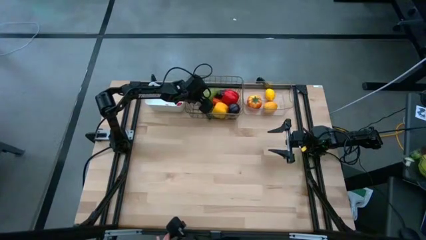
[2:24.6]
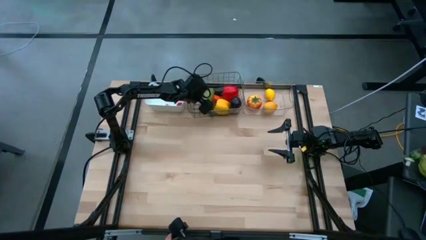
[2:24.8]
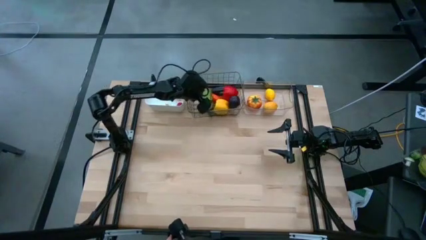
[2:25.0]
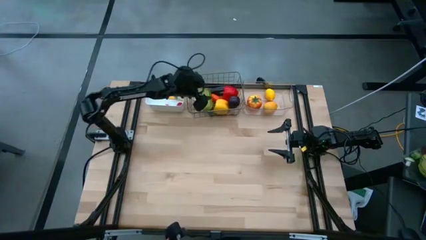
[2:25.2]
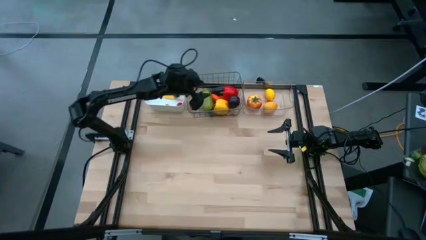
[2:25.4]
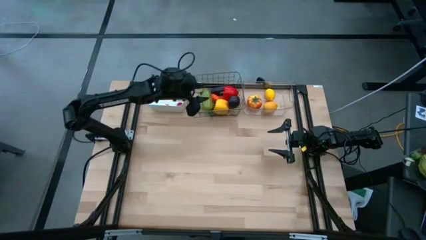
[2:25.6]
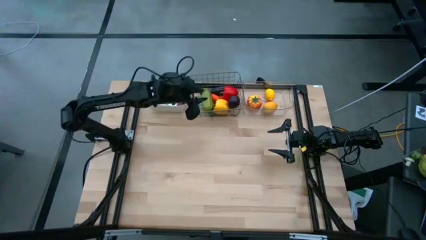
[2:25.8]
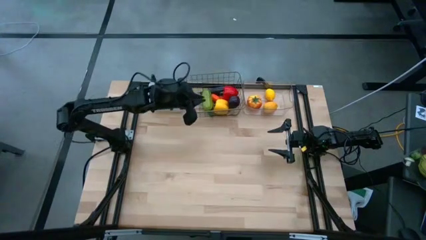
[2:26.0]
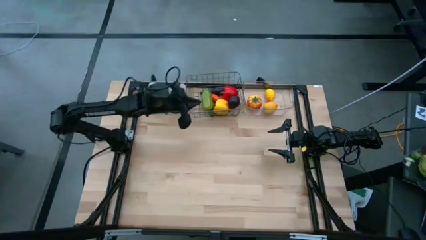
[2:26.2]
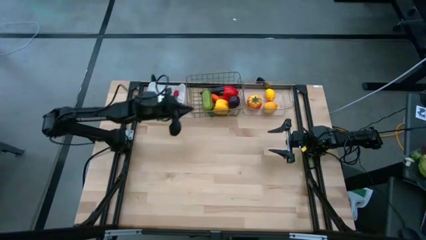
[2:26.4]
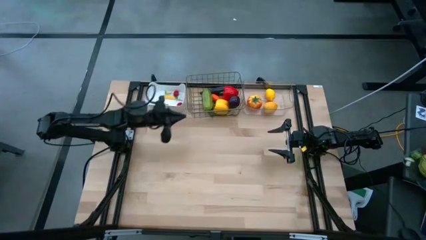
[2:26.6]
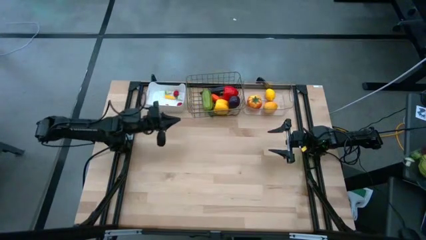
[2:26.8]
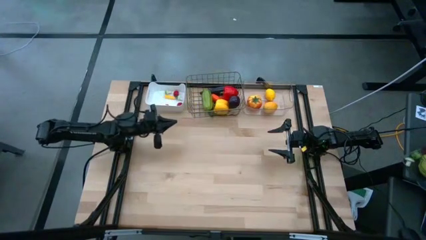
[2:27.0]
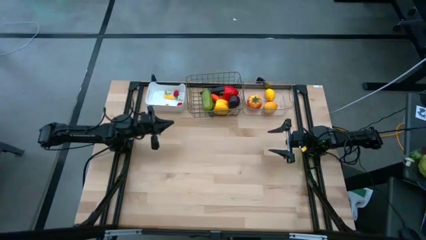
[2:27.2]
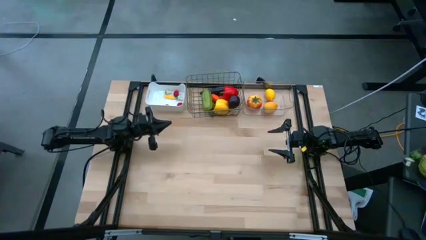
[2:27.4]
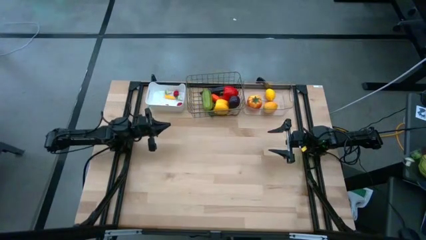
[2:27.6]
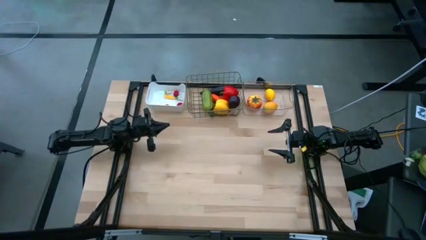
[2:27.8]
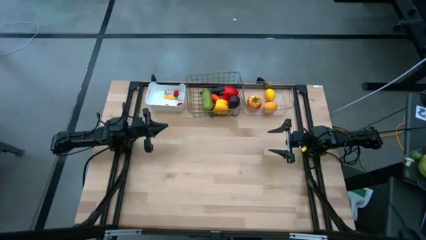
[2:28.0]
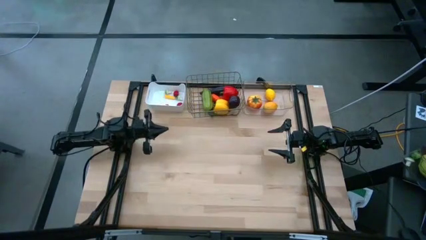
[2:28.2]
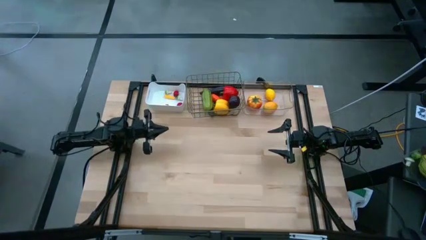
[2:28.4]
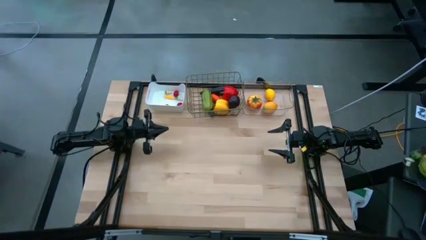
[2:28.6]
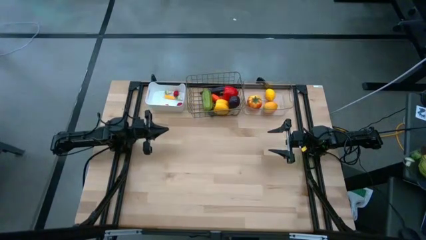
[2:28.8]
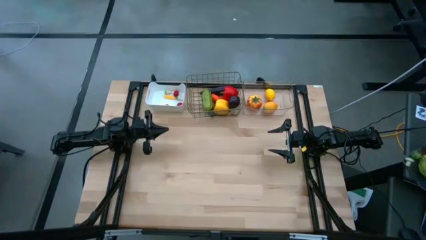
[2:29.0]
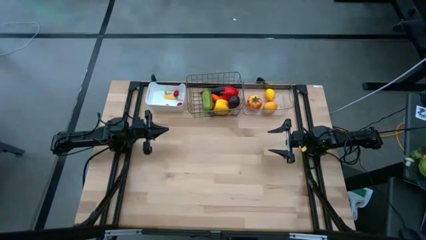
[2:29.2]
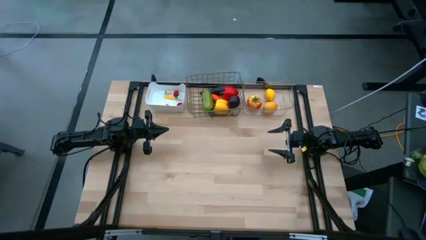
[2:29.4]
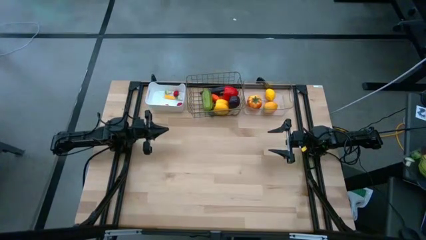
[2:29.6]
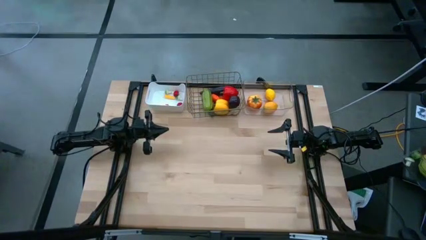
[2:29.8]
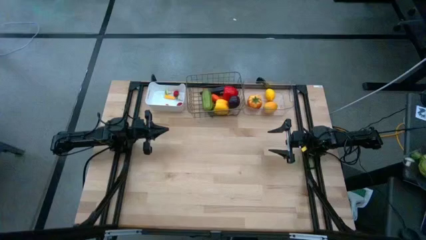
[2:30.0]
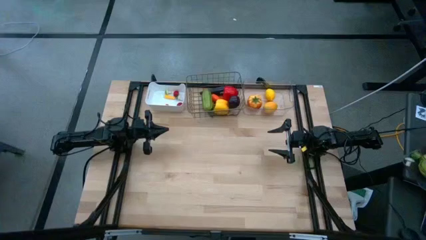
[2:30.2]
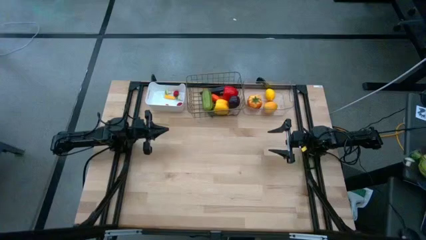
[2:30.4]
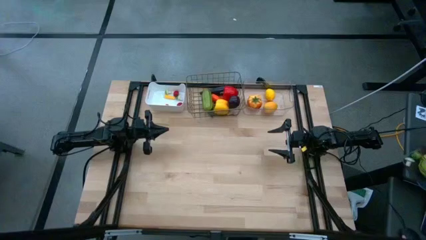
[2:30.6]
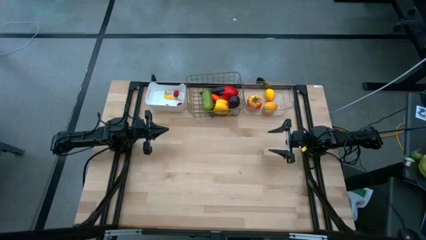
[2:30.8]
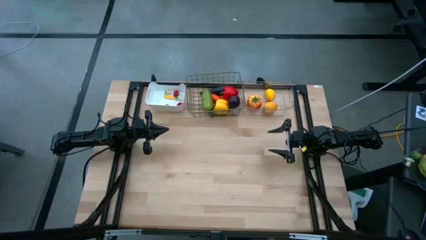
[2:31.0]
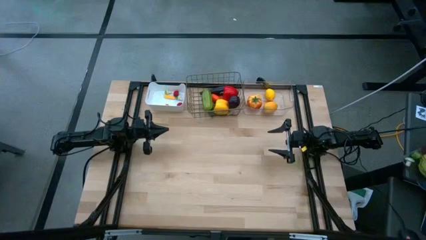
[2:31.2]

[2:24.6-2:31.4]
Task: Sort produce into baskets
Return to Home Position

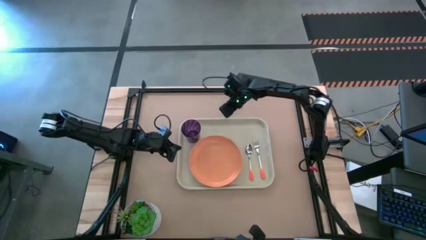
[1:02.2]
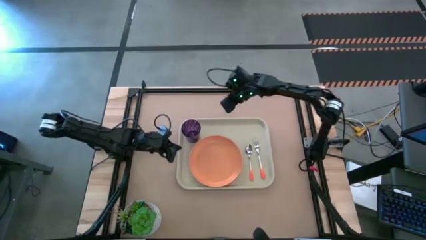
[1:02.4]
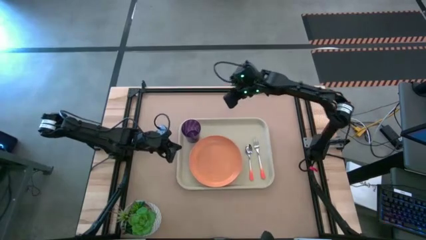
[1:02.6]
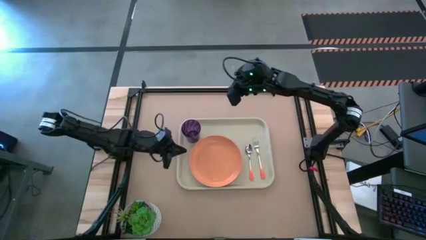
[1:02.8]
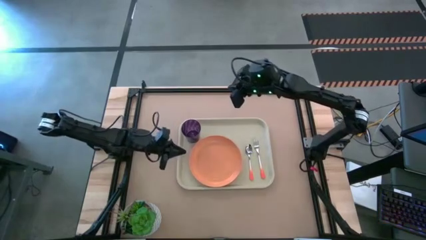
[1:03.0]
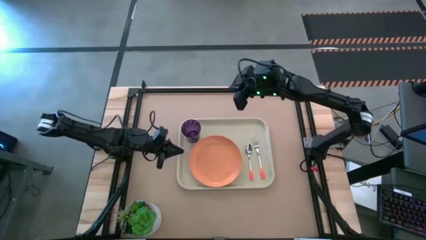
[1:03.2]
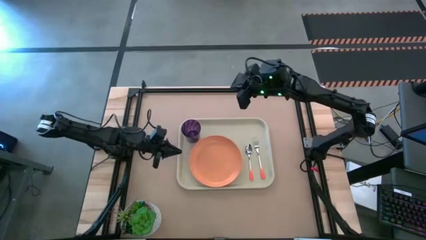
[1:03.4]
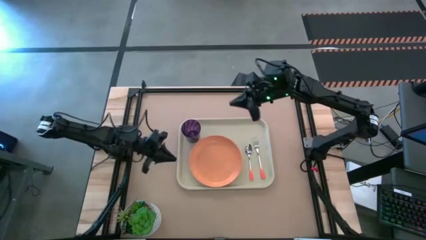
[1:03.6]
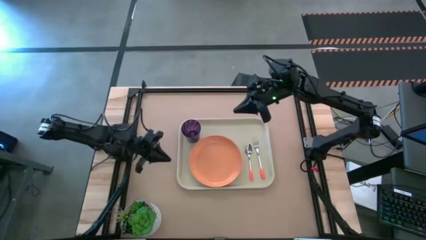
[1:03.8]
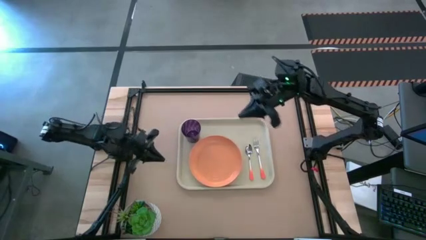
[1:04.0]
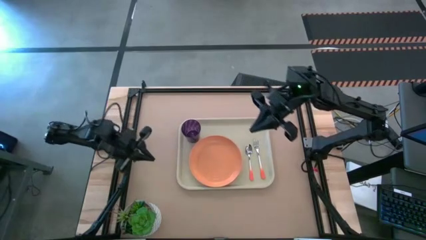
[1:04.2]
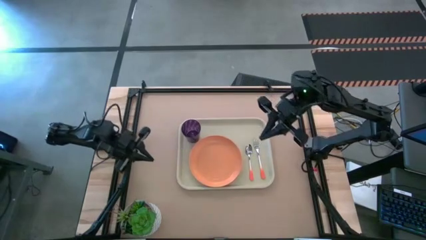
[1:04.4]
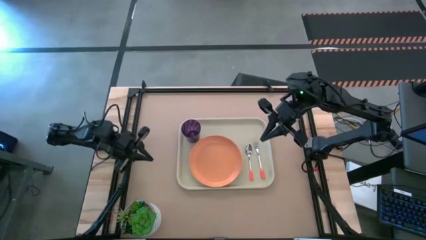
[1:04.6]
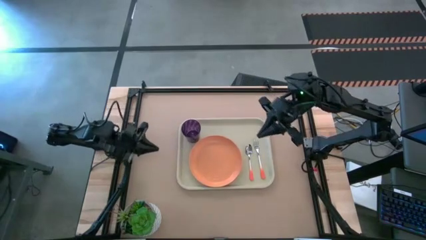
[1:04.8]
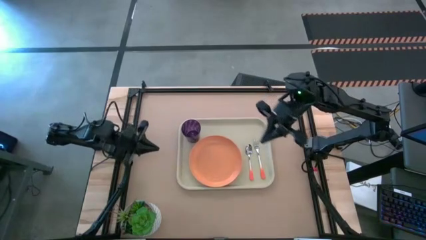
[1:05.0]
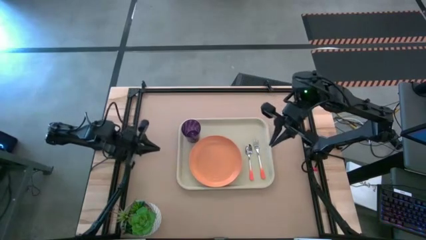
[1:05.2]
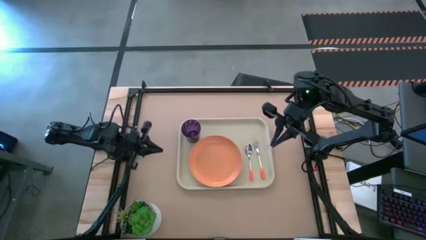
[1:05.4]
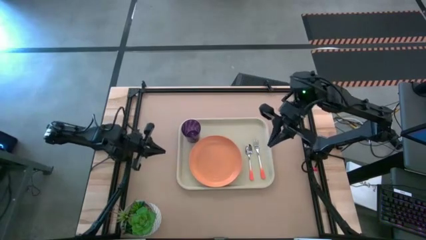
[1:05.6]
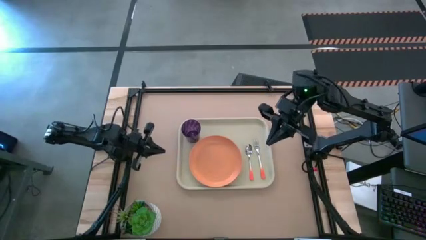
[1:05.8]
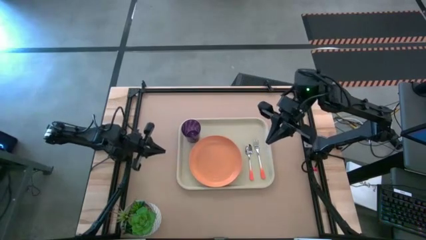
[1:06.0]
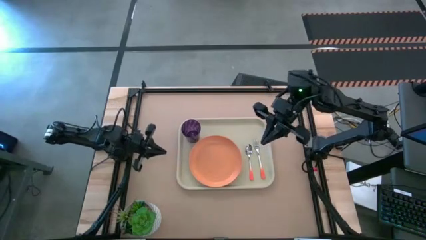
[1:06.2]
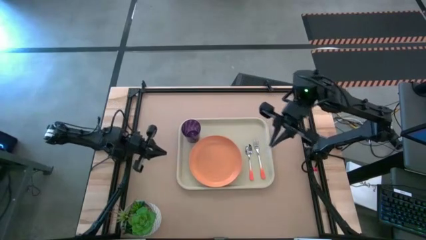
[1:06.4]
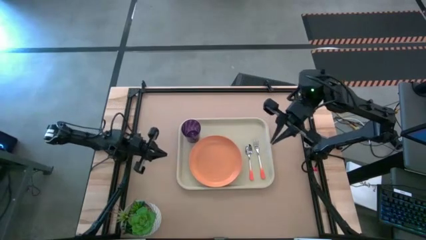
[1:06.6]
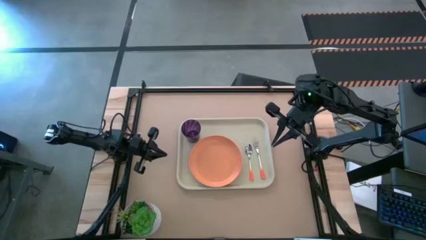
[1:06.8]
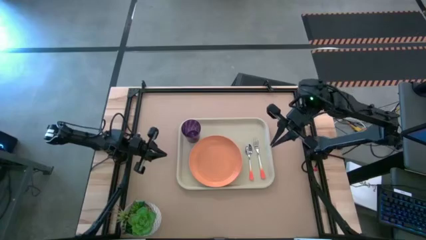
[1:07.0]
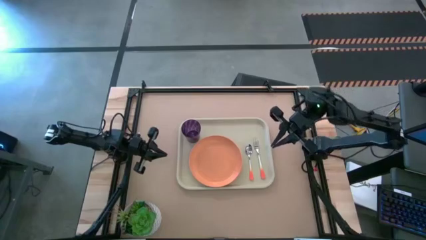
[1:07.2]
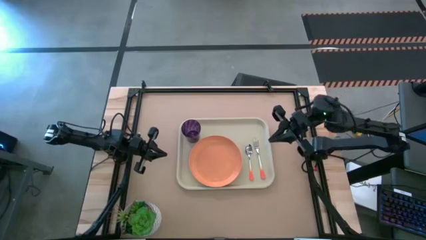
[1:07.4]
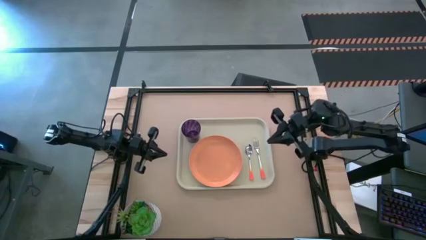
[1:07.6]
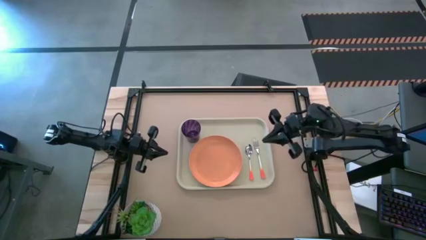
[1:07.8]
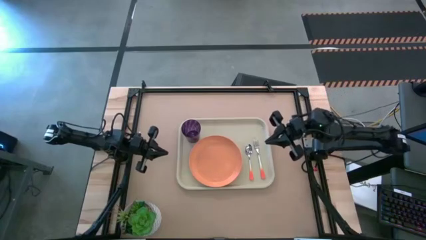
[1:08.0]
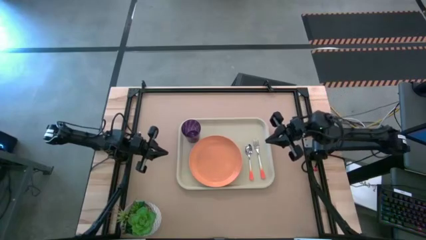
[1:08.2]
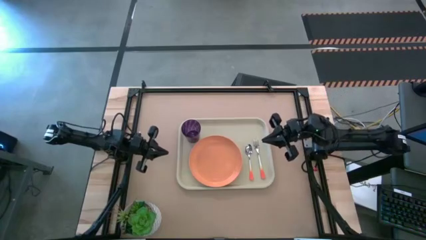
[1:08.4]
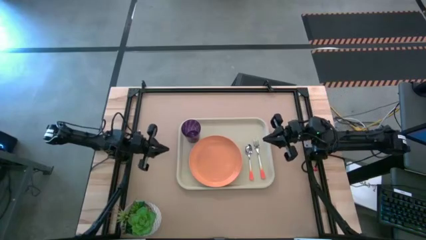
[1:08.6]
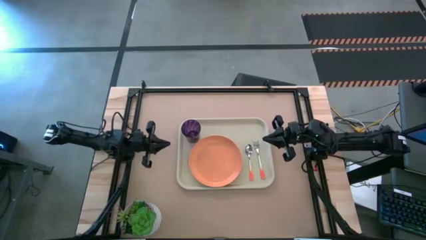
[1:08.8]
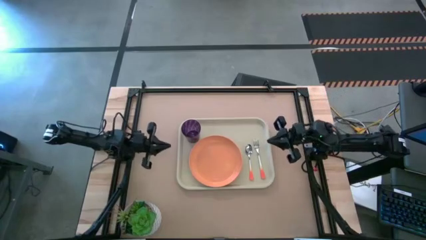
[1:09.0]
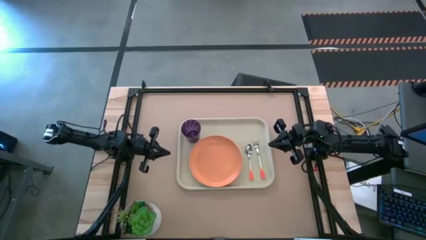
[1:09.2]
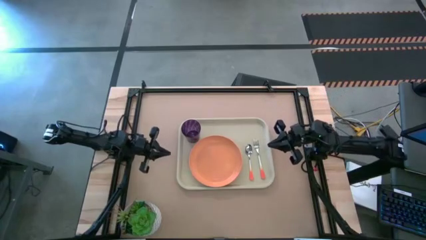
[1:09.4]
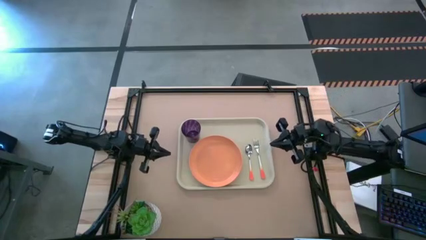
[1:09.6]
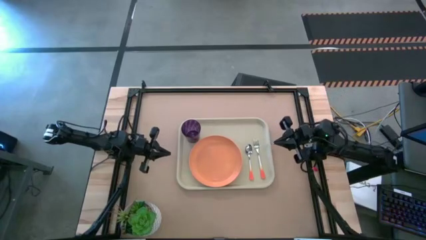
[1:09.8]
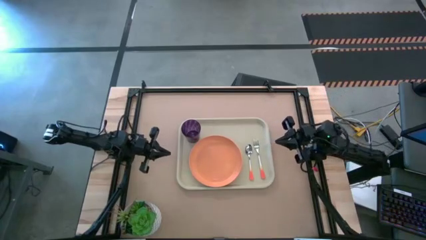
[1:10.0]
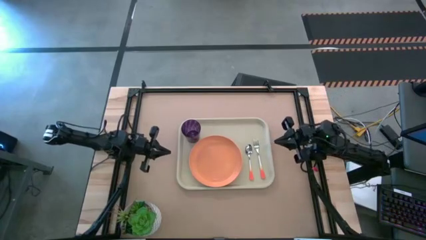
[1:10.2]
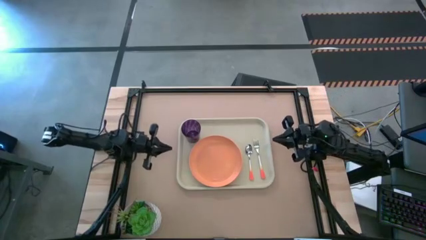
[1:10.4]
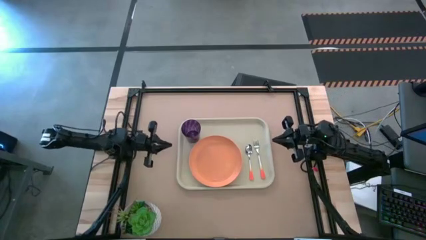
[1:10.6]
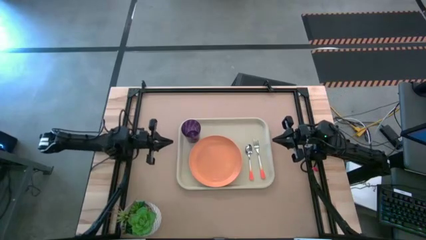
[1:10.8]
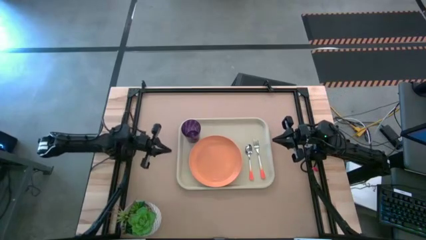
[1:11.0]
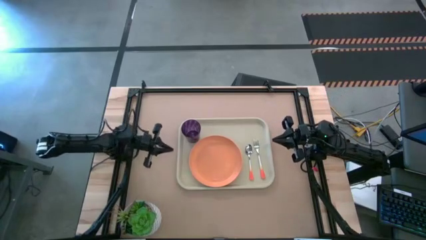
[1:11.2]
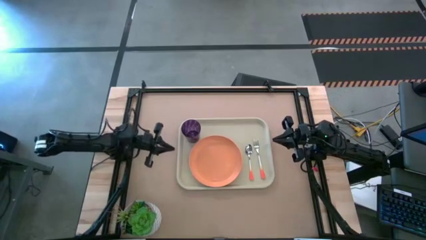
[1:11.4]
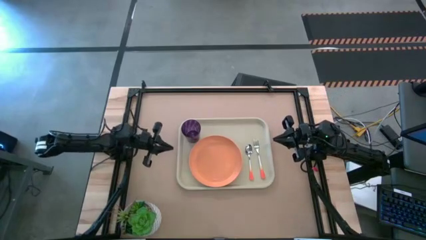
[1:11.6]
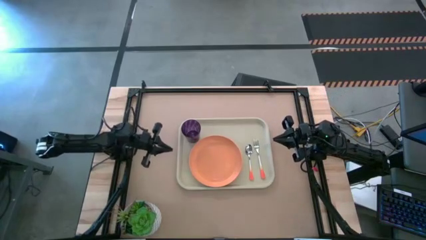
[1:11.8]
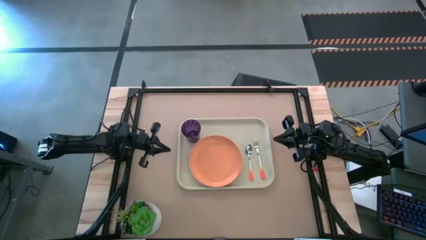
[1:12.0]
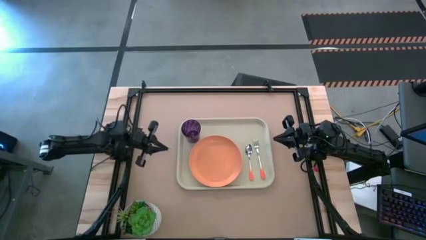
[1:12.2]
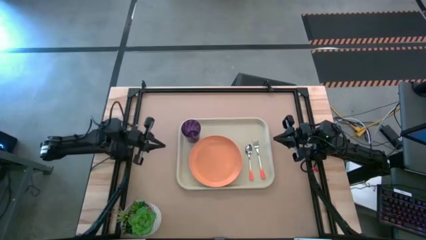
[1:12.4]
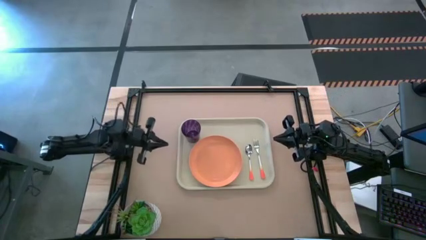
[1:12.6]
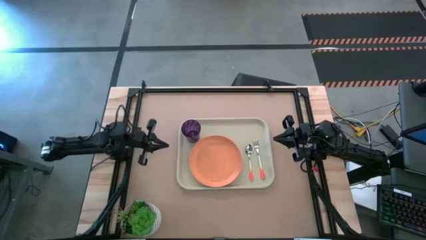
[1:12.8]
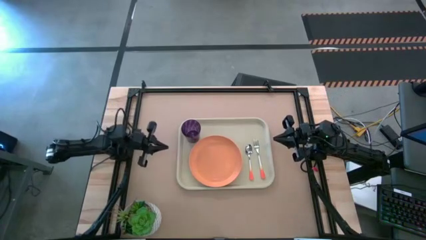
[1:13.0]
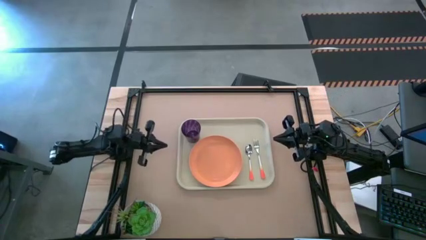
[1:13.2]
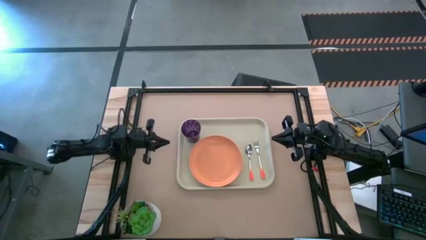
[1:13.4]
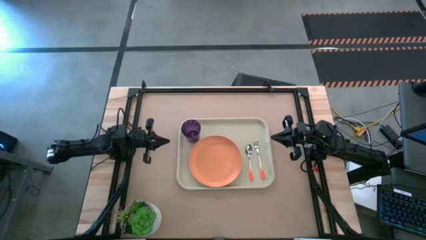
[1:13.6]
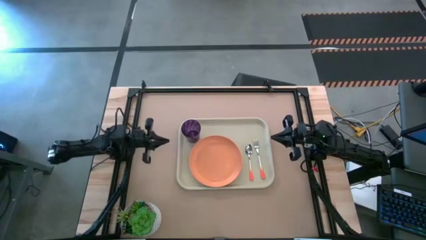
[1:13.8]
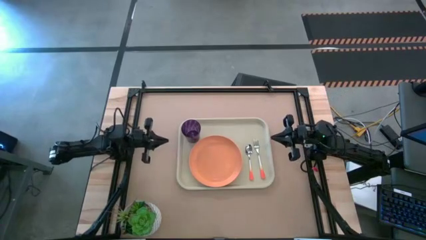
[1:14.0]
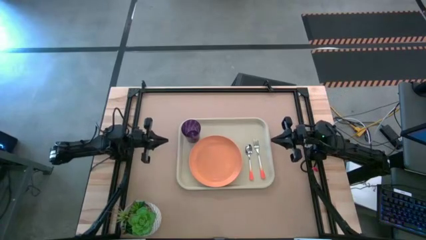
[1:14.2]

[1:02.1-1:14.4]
Task: Pick and place plate/cup/fork/spoon on tray
Return to Home Position
